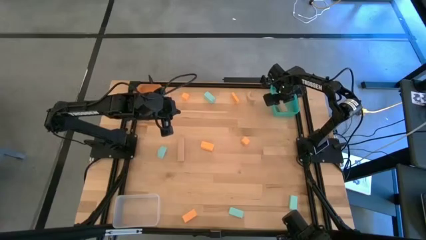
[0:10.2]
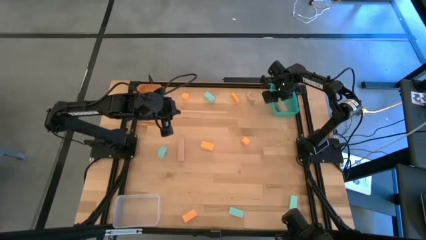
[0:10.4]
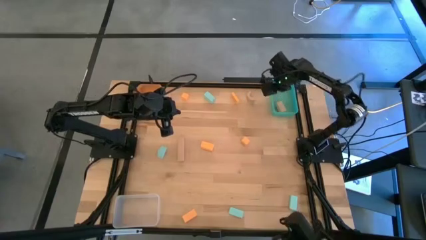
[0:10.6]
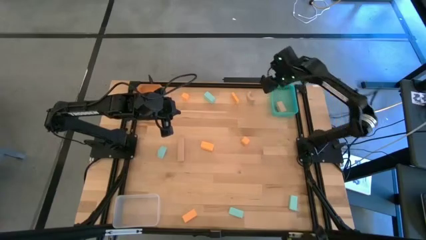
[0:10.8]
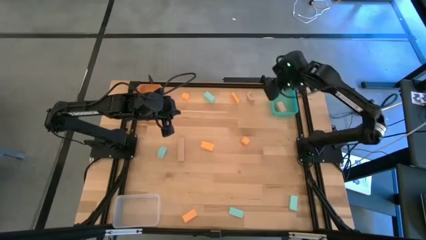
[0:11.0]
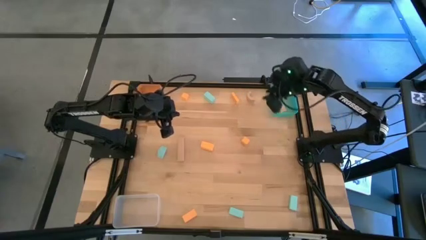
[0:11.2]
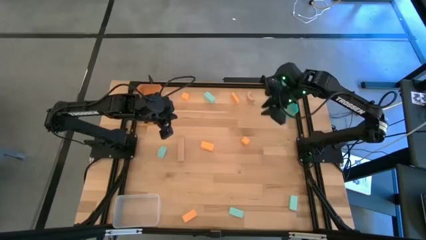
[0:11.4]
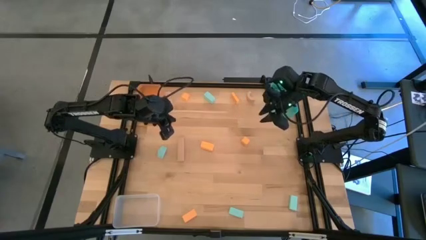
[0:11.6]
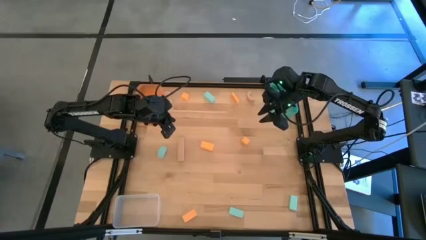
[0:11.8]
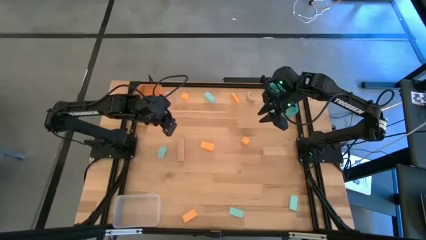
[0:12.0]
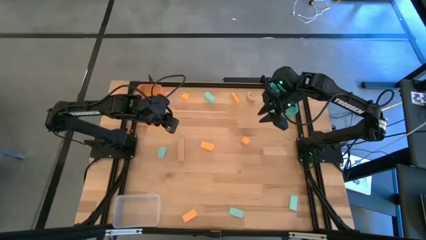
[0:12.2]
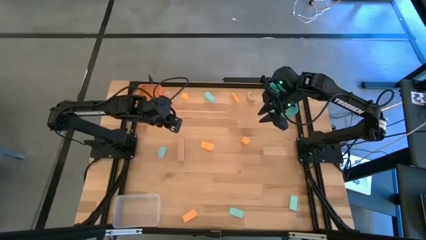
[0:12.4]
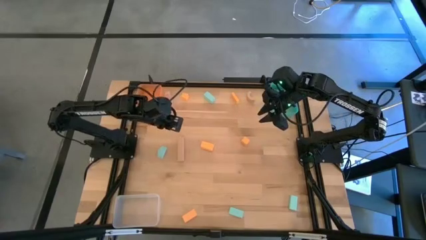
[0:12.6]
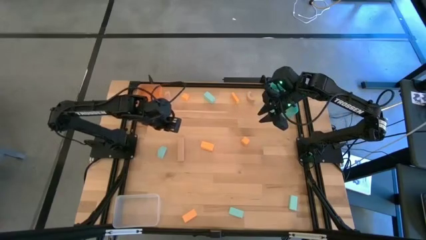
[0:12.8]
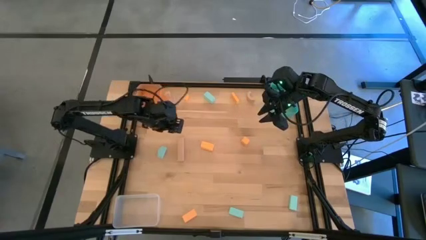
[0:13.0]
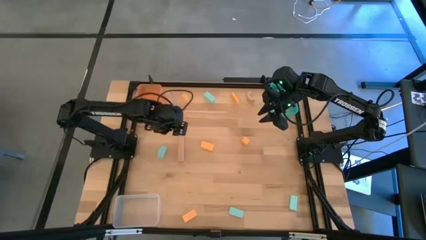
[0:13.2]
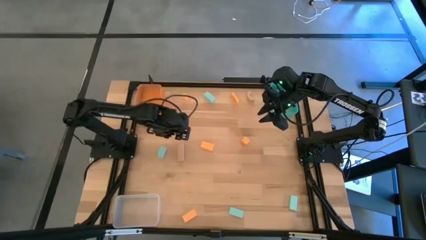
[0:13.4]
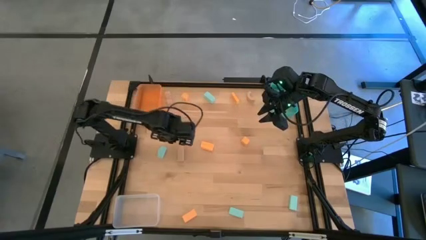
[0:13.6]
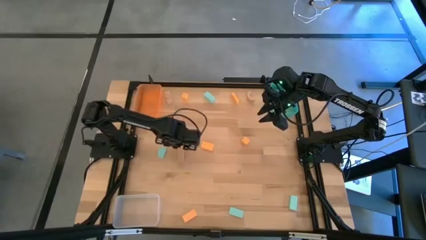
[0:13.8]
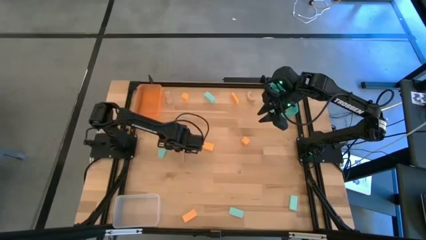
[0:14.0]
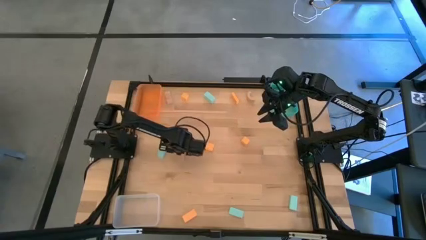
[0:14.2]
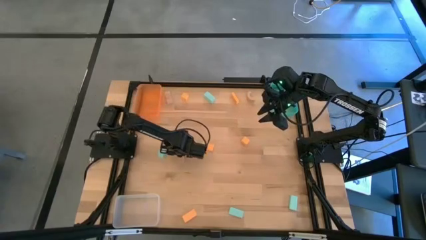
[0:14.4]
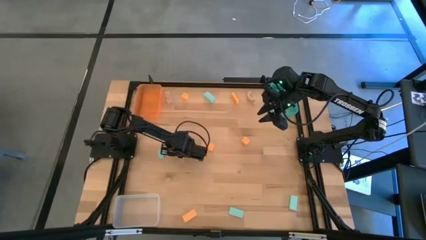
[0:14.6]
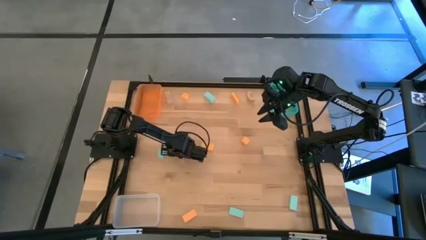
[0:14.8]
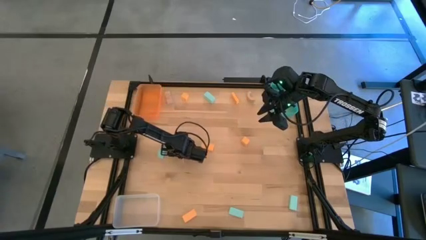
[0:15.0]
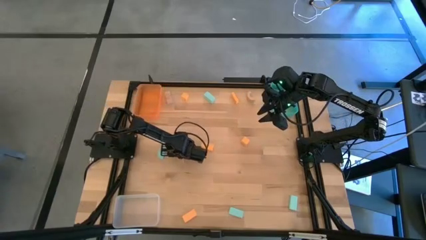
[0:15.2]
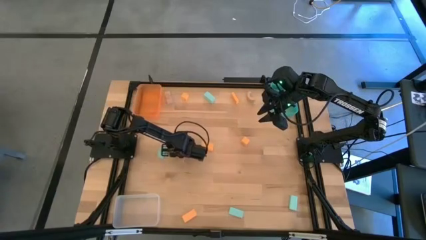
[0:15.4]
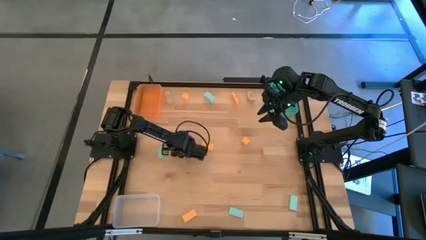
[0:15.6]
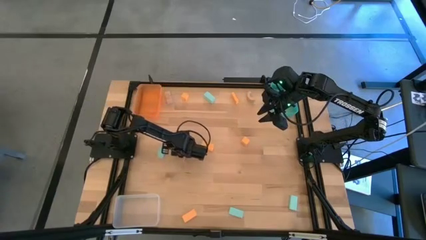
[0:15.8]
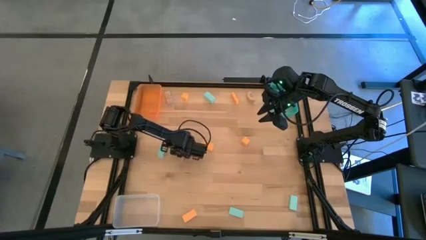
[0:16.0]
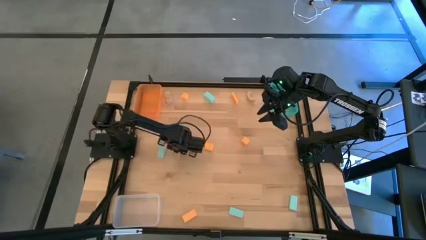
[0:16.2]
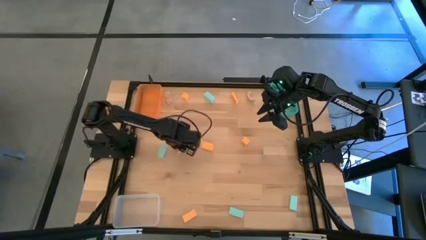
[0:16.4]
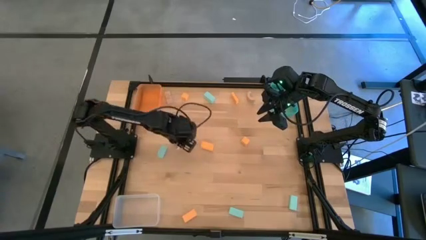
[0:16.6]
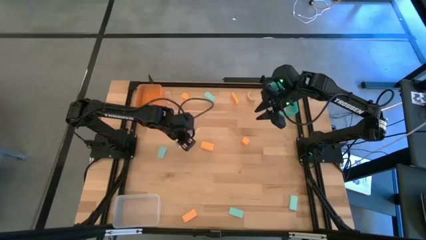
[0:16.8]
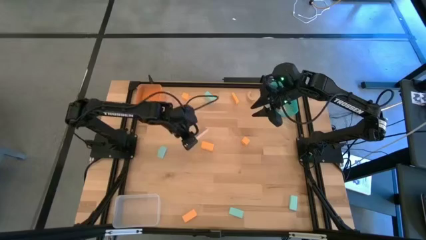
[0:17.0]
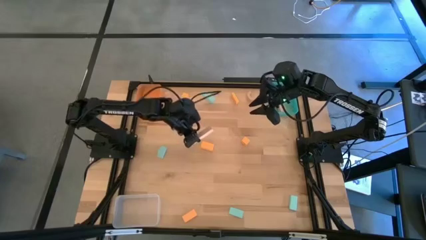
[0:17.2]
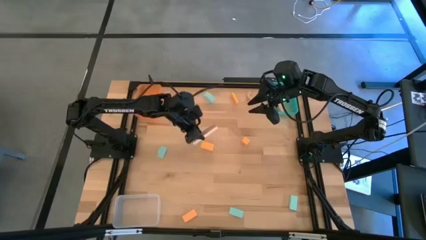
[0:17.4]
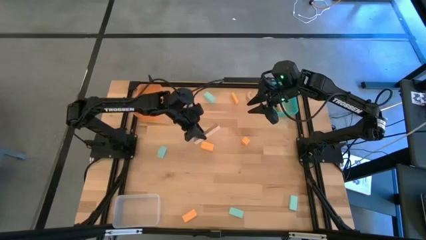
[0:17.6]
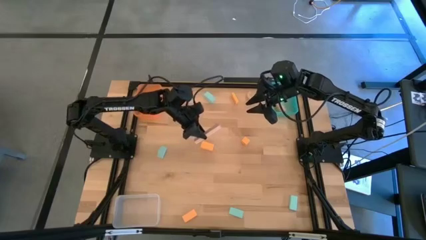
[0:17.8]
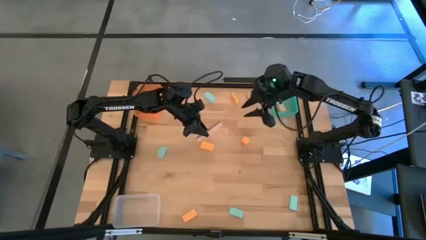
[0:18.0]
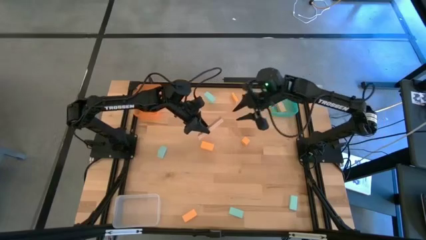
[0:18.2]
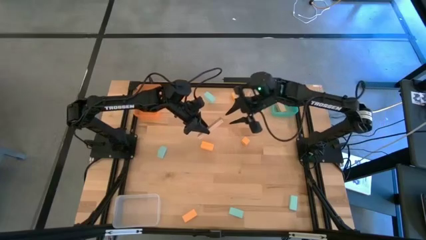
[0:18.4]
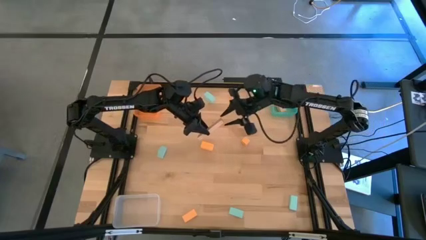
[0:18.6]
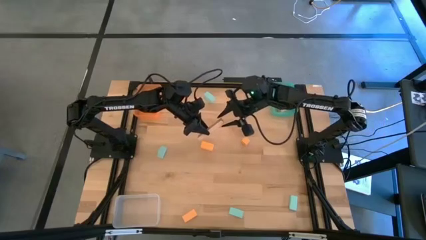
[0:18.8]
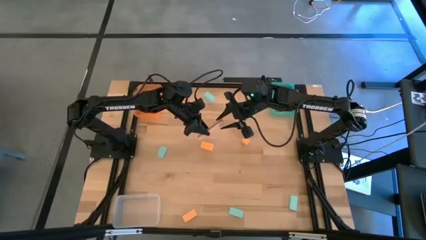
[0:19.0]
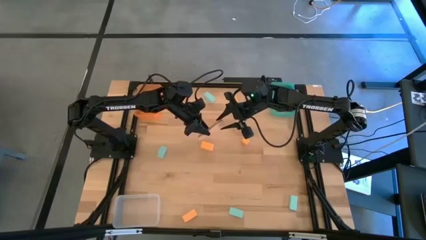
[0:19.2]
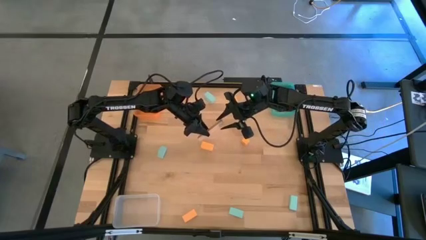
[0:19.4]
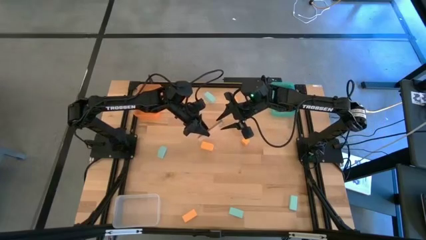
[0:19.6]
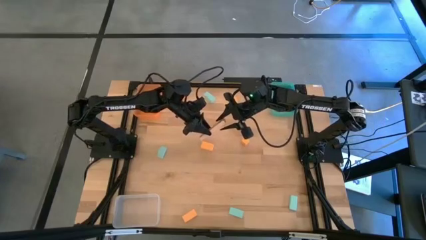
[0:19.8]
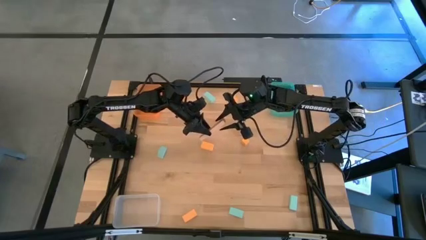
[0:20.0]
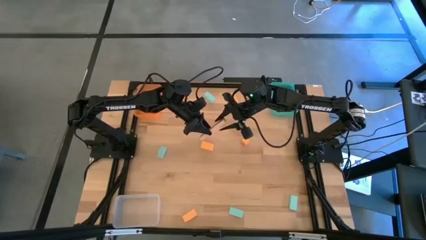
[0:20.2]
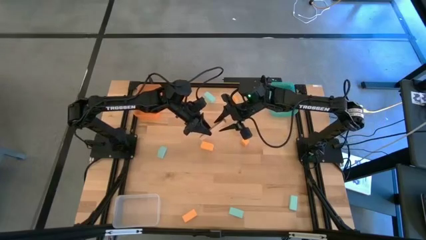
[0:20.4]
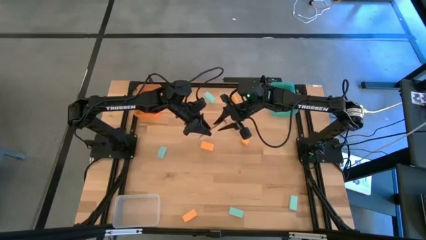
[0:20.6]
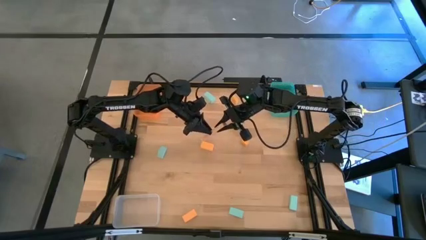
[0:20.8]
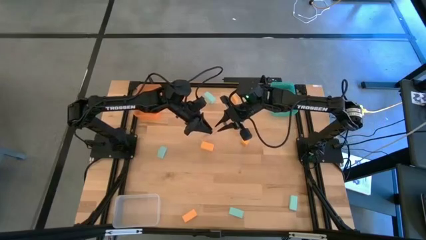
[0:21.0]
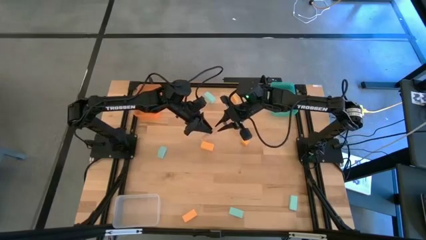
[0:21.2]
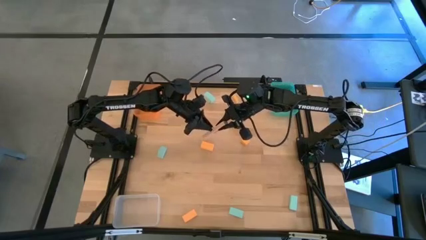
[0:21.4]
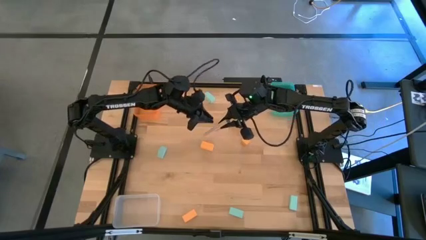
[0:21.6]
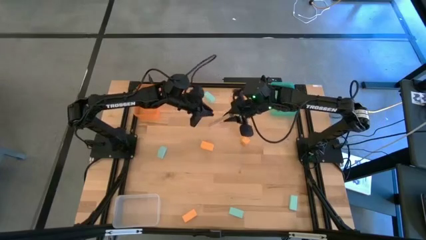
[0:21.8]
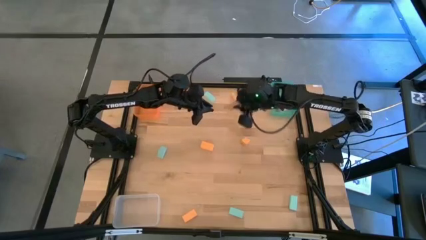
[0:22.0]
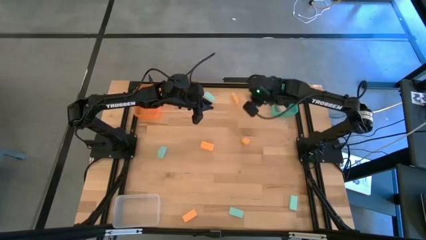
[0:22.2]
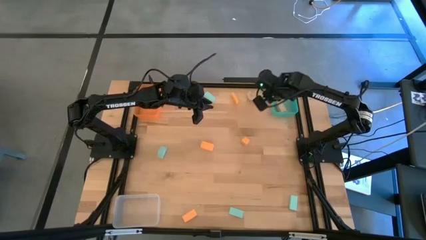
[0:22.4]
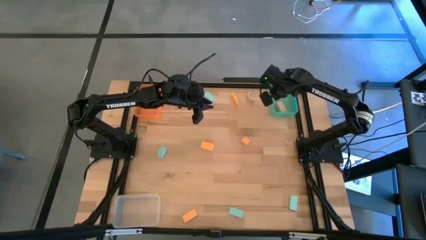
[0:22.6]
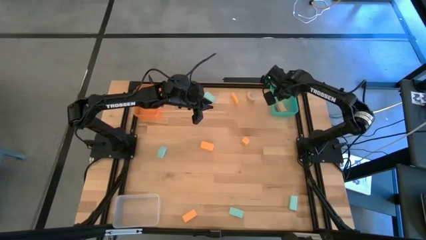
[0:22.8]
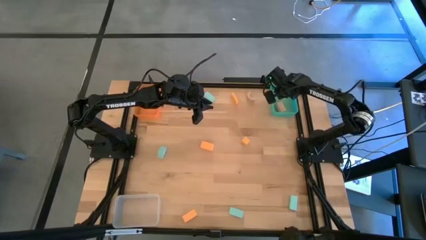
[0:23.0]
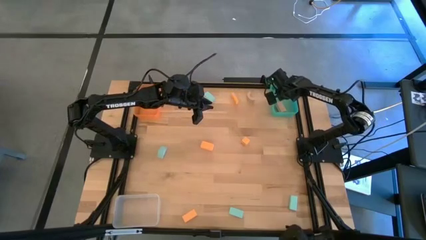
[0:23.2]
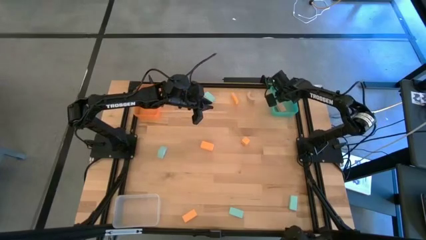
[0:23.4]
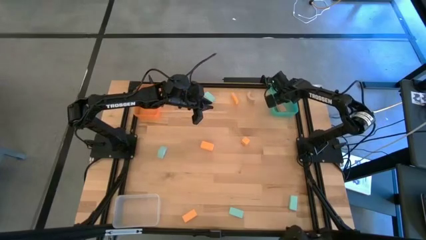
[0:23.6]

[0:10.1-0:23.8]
Task: Sort & place blocks by color
Put the brown block into the blue bin
